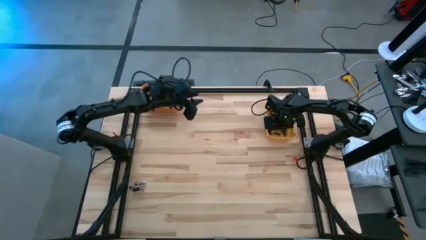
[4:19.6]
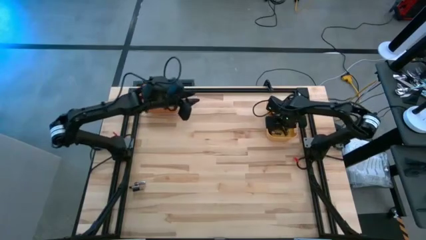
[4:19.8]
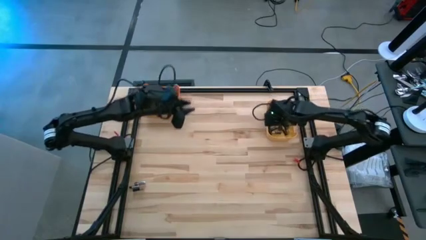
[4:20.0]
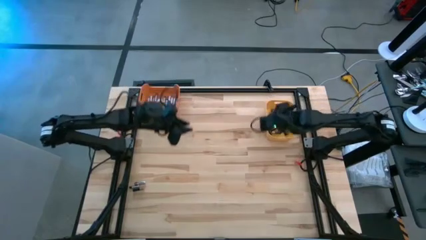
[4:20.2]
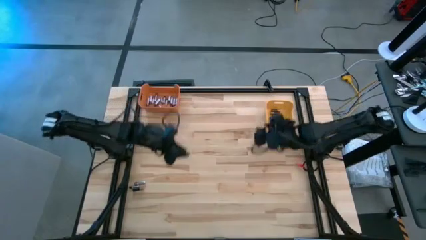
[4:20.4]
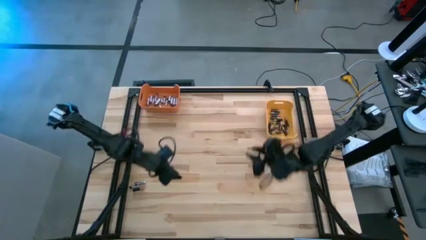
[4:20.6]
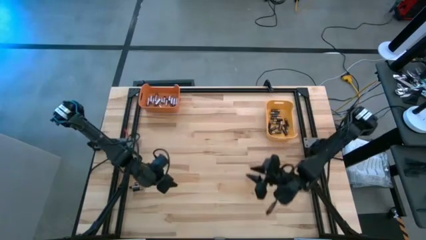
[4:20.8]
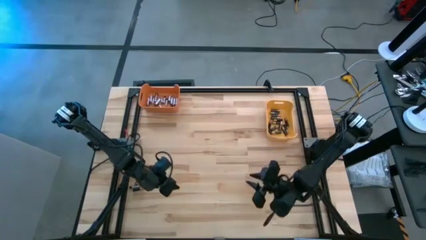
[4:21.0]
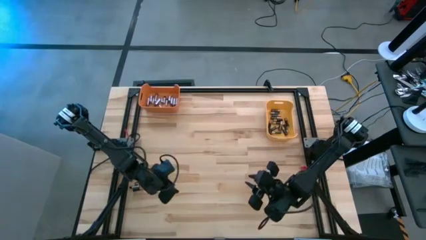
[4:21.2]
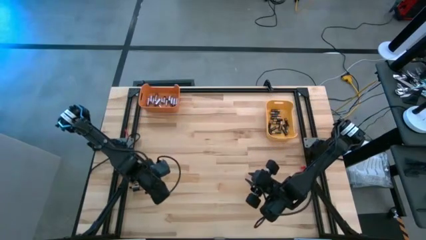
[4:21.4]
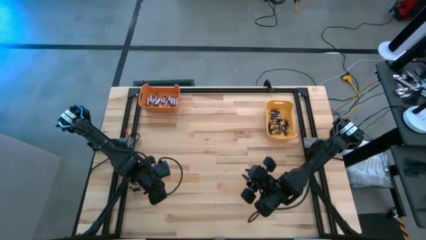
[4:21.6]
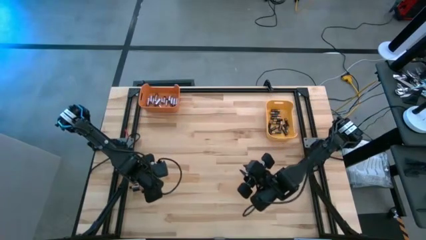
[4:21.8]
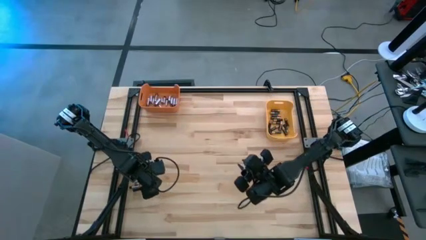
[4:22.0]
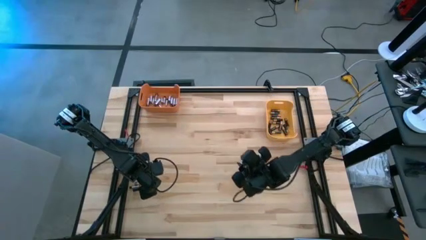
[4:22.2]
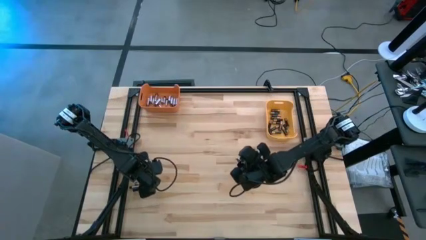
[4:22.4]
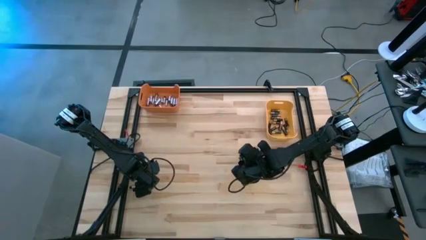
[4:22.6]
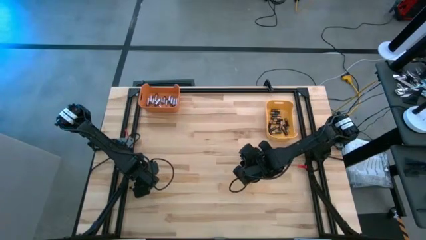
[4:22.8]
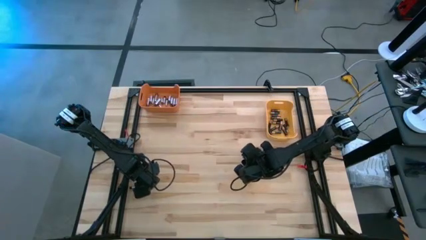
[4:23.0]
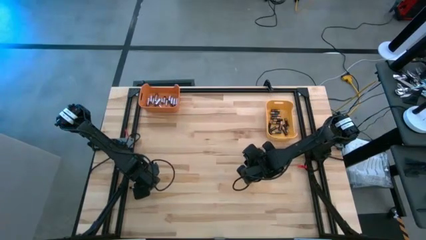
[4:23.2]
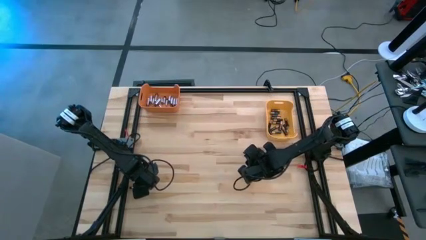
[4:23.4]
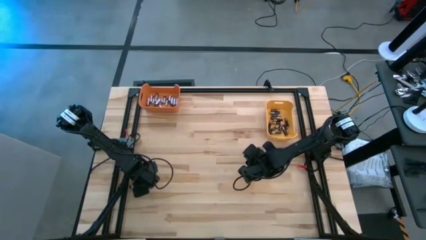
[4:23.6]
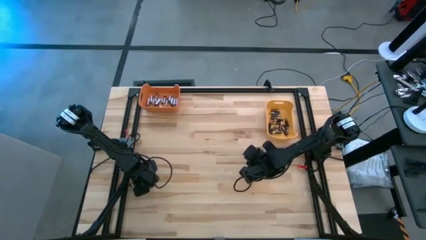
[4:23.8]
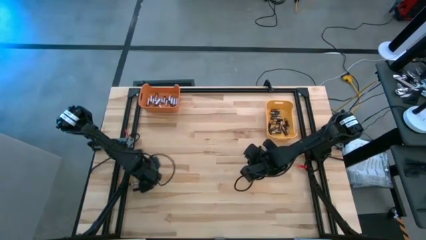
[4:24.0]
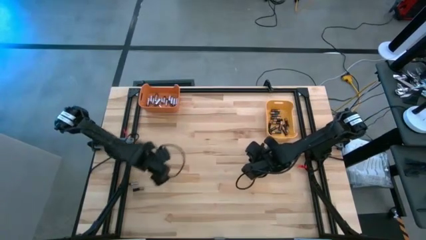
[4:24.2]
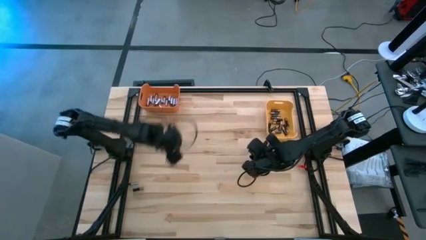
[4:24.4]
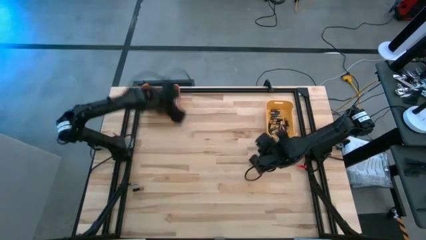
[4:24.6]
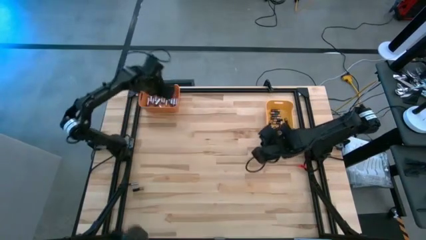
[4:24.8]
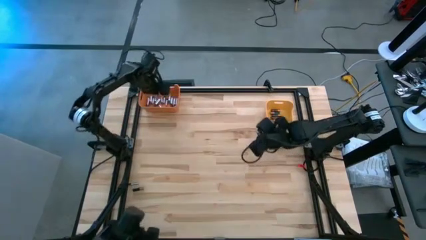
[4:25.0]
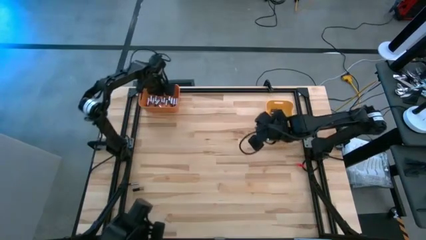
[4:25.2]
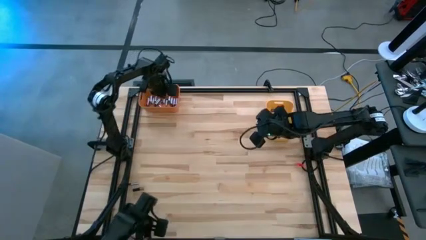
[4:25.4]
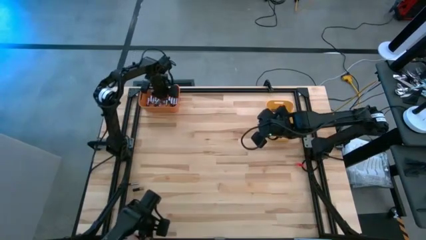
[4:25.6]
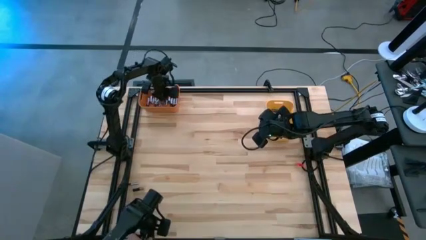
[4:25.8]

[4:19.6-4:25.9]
Task: Sort batteries
Put the silver battery into the orange bin

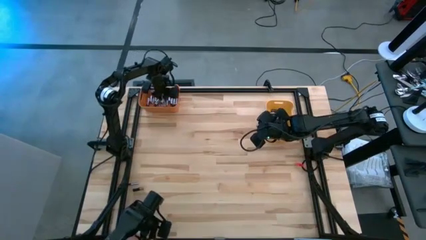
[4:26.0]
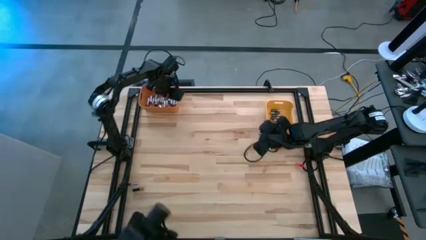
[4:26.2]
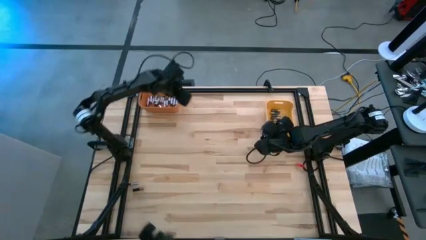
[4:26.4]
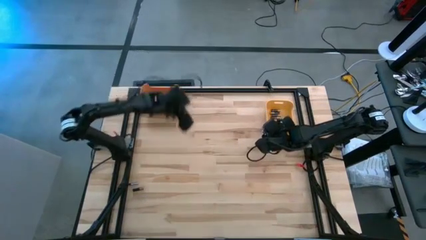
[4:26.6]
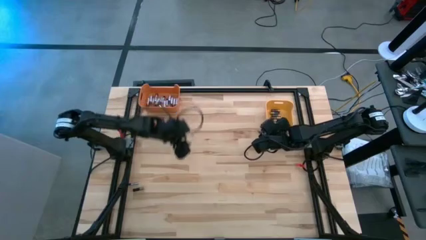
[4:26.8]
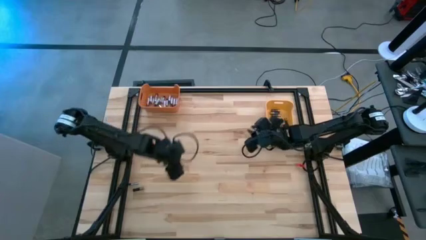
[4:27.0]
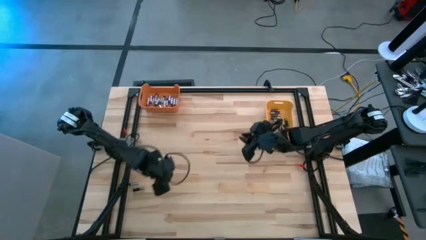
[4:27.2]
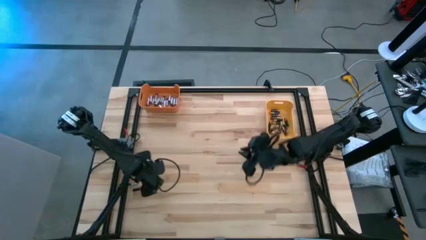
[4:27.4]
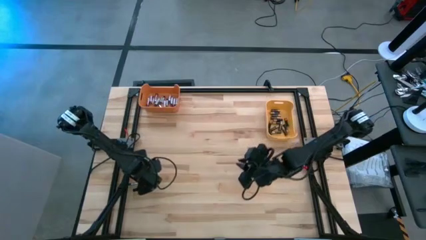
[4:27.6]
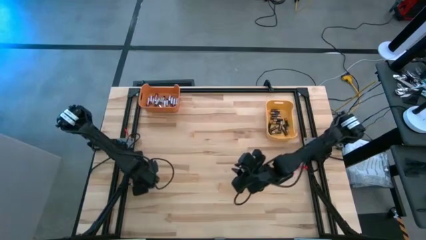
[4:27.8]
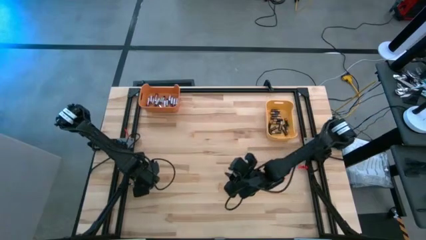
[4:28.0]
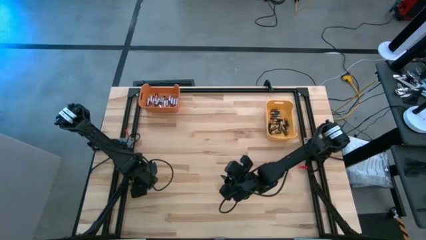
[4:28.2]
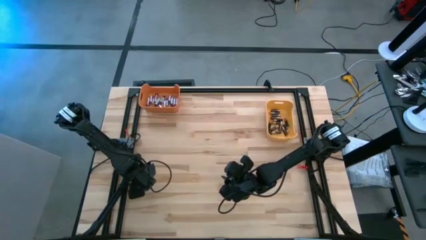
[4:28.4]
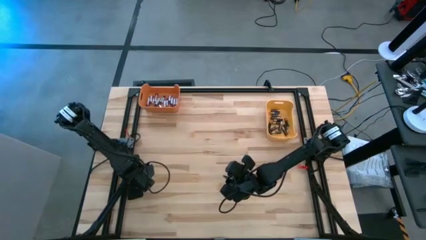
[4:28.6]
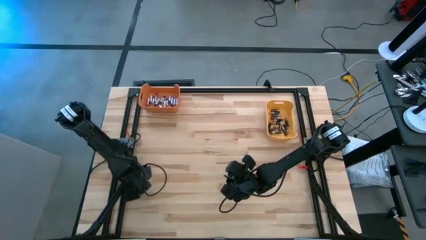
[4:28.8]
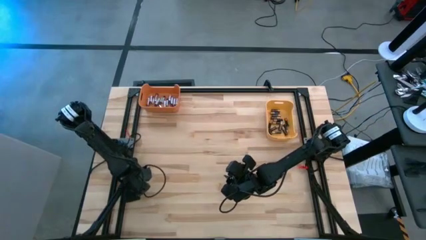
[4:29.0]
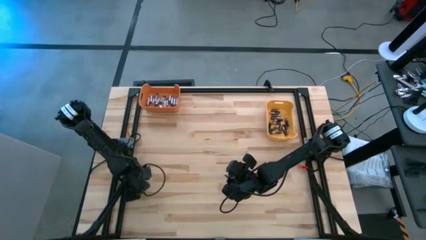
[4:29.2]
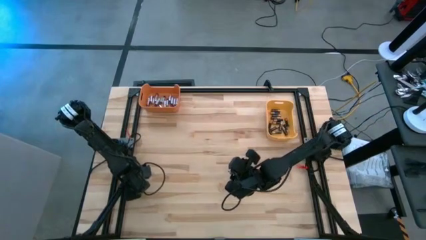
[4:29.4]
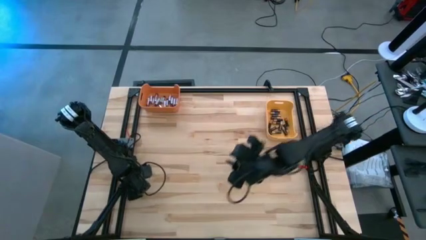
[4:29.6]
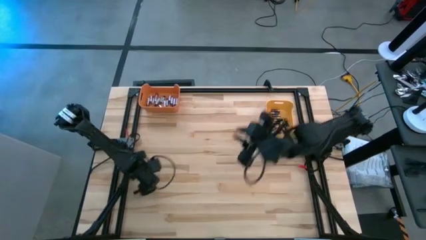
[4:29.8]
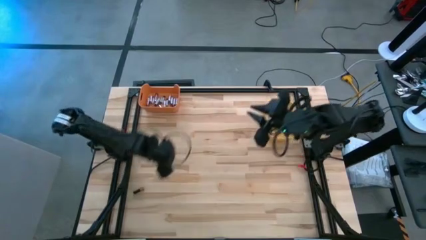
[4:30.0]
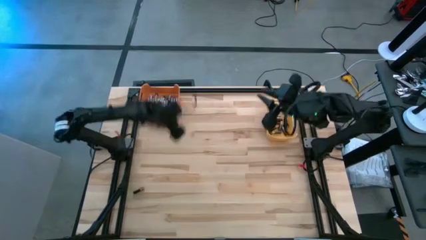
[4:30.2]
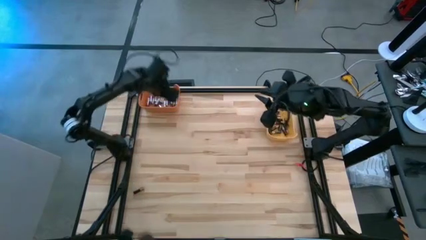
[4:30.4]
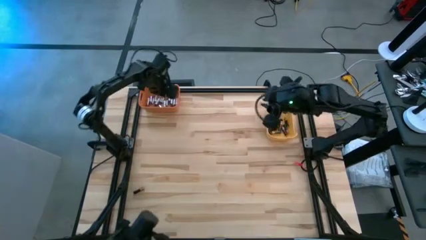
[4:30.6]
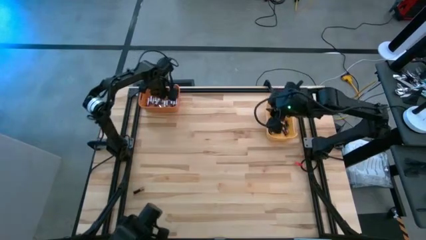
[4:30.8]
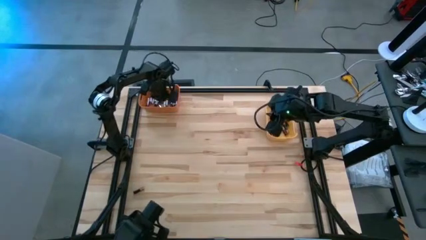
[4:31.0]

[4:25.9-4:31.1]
Put the silver battery into the orange bin

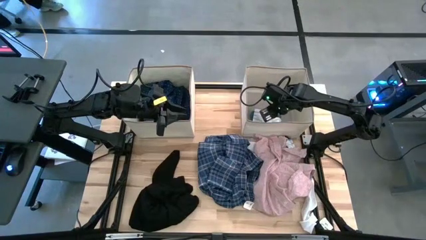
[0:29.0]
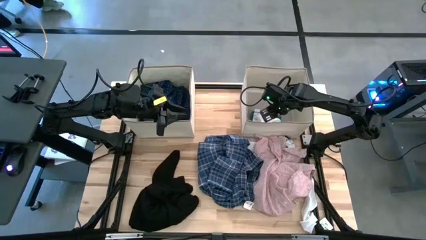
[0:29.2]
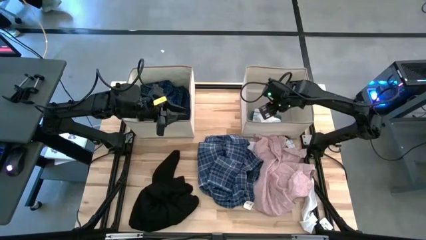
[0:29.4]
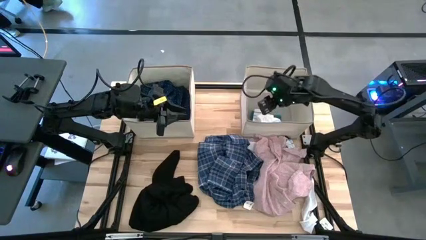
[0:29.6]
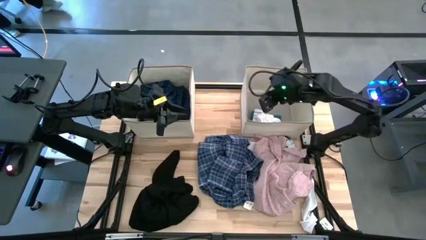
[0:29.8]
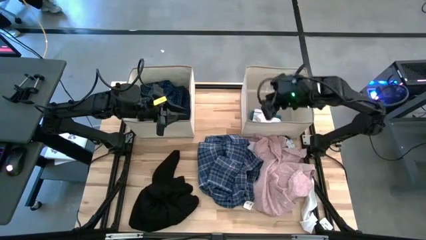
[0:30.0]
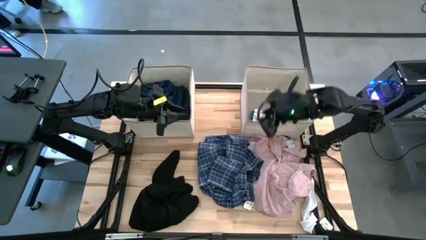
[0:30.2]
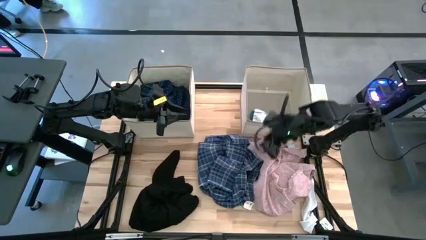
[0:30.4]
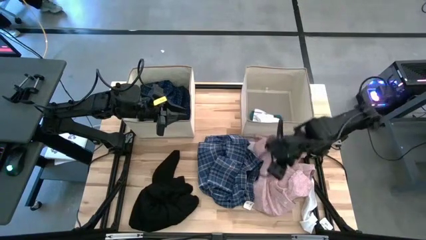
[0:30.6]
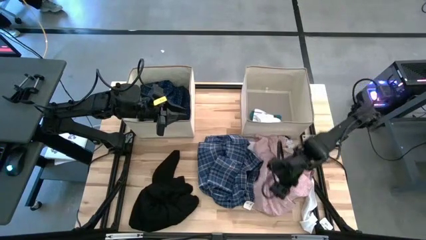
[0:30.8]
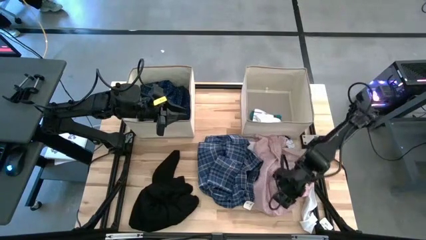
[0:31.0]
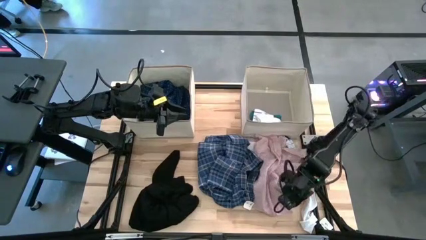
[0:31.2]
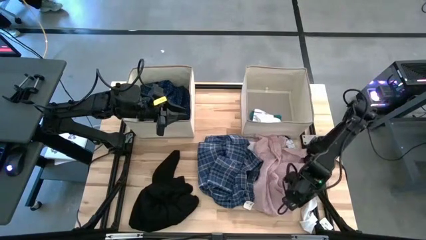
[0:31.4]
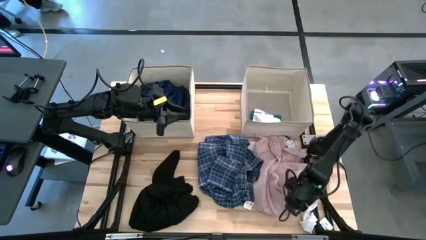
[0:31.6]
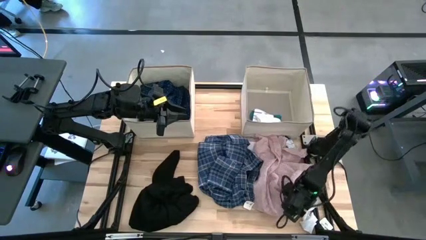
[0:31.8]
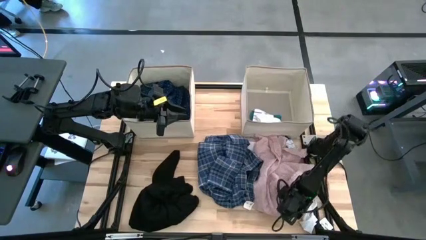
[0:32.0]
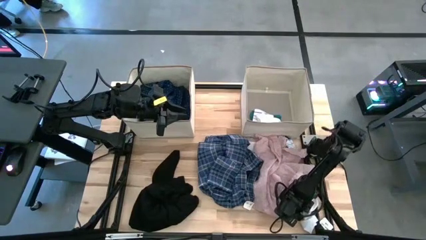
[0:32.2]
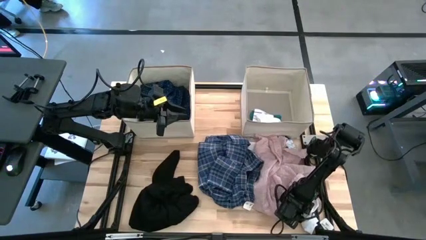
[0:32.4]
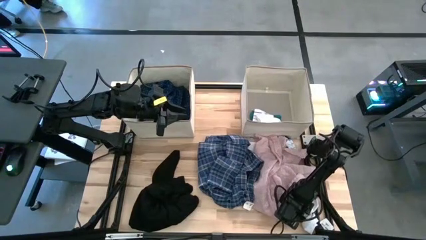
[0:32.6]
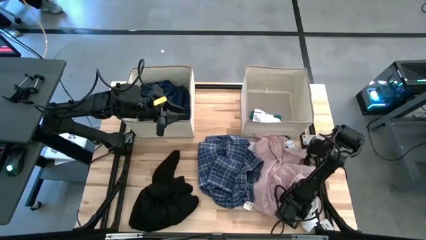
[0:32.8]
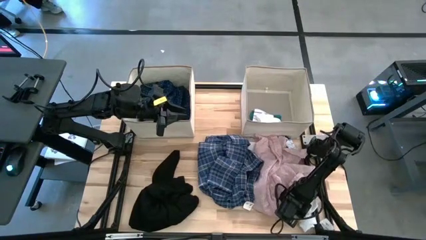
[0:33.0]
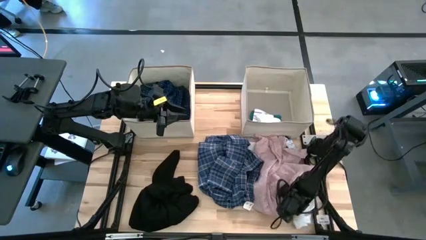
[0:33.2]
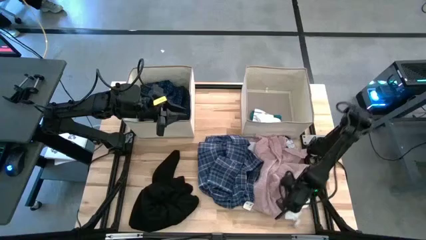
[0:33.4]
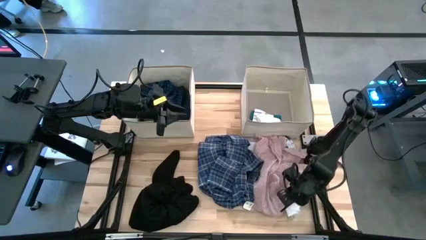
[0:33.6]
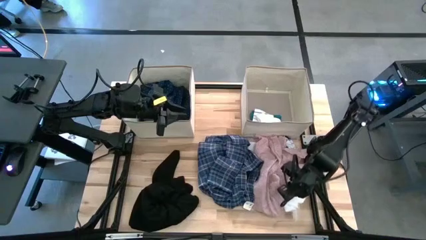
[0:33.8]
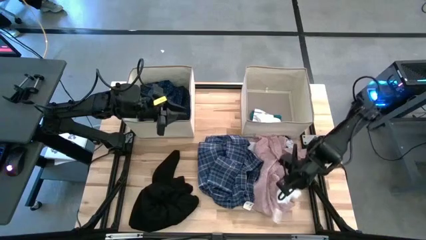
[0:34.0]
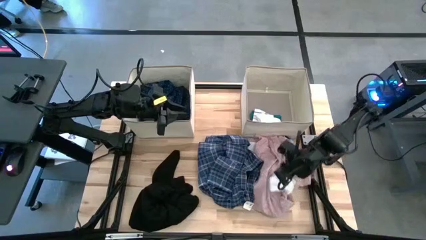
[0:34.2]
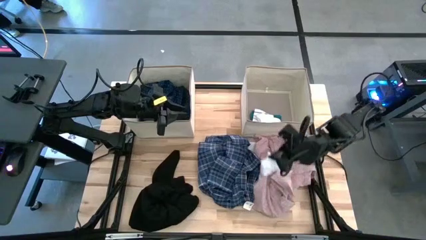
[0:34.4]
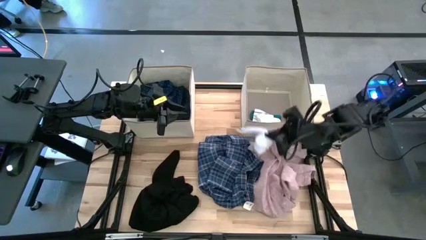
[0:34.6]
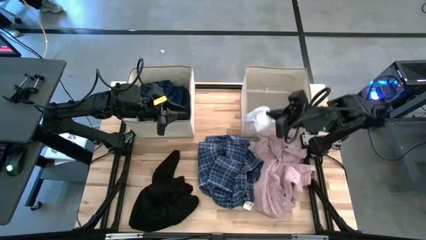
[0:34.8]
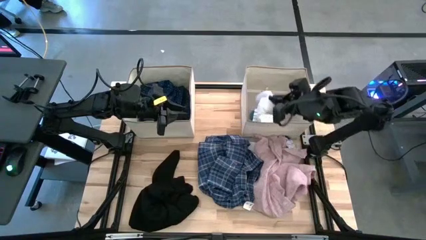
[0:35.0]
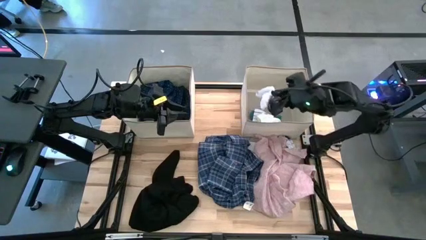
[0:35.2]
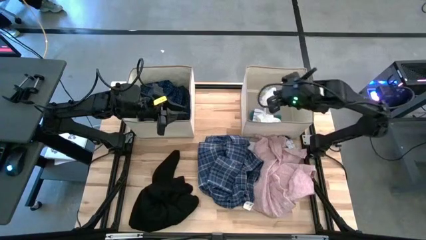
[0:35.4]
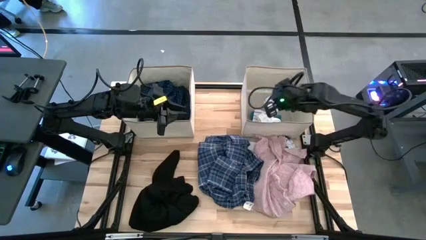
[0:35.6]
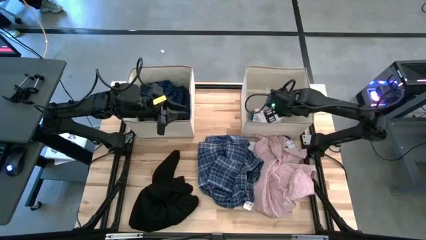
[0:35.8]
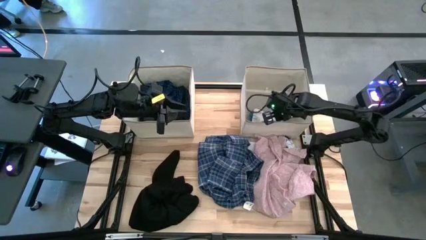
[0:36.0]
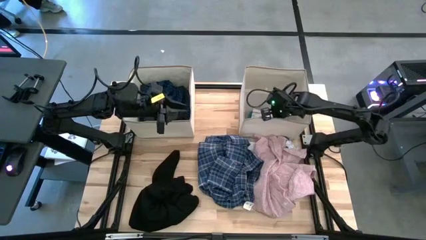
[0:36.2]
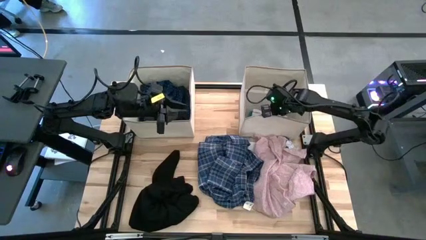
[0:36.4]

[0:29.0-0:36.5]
Task: Sort clothes
Put the white sock into the right laundry bin
